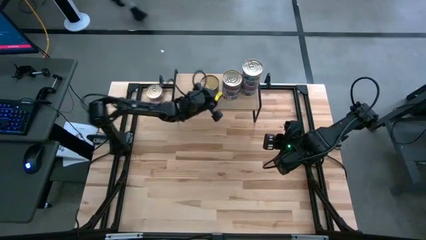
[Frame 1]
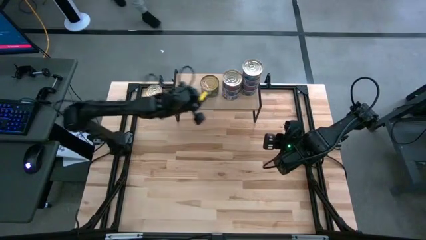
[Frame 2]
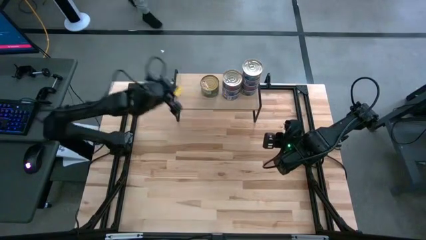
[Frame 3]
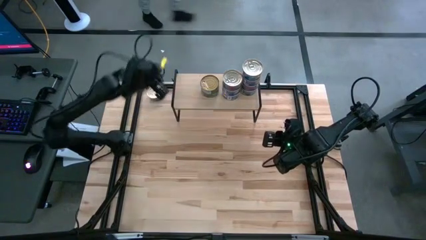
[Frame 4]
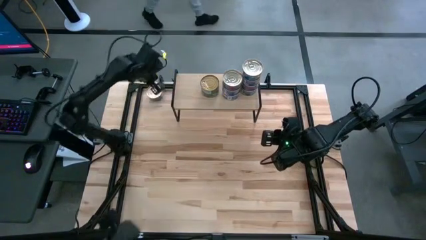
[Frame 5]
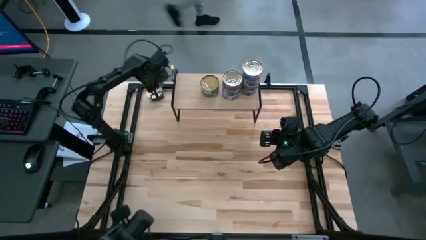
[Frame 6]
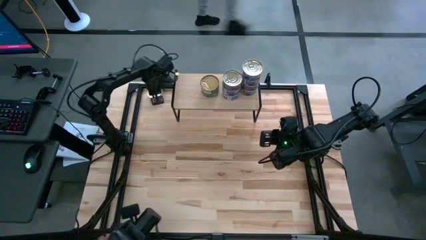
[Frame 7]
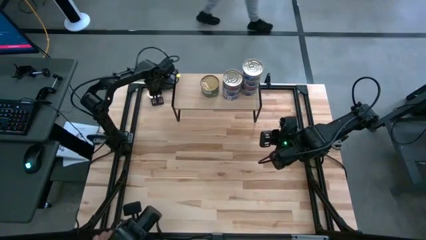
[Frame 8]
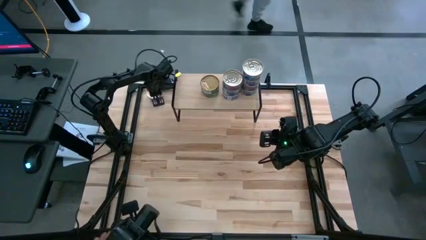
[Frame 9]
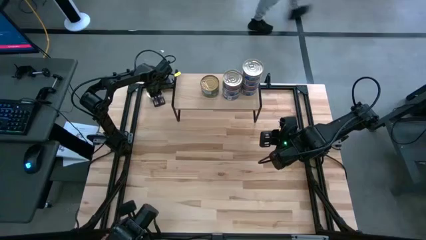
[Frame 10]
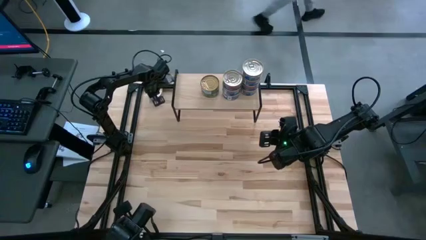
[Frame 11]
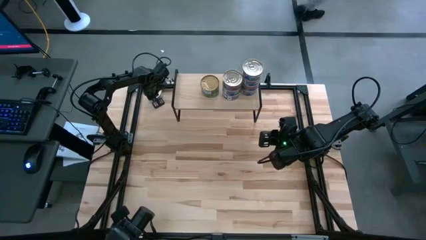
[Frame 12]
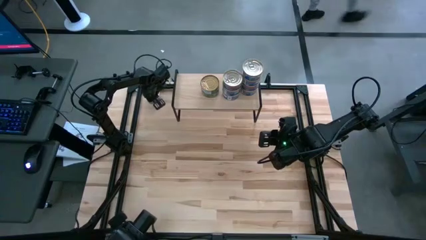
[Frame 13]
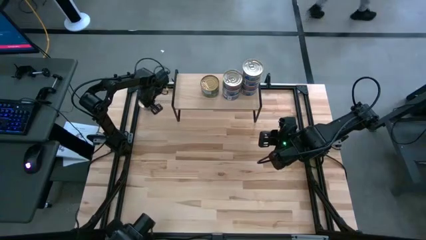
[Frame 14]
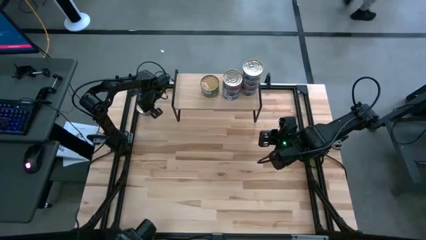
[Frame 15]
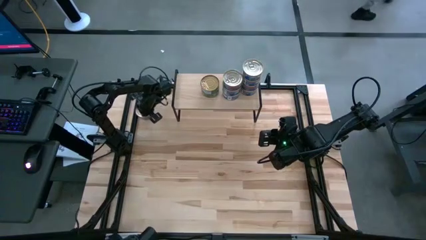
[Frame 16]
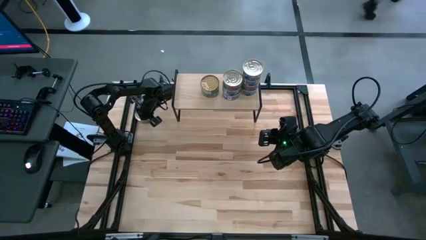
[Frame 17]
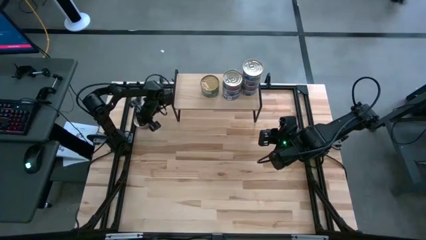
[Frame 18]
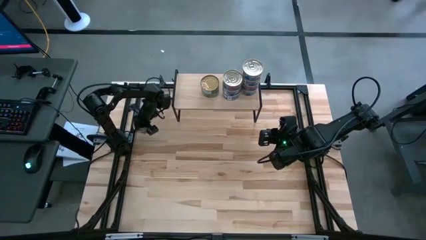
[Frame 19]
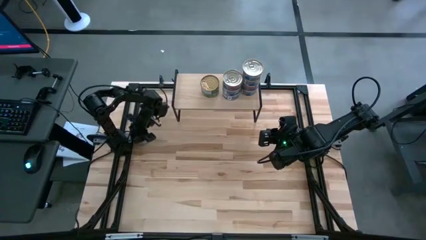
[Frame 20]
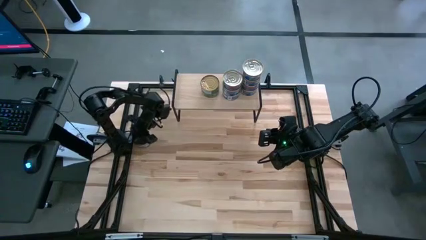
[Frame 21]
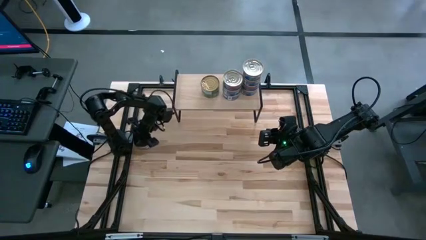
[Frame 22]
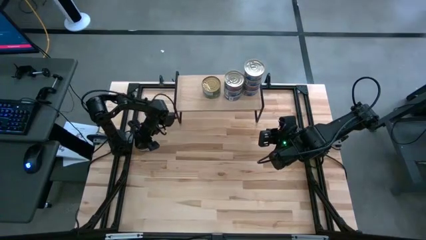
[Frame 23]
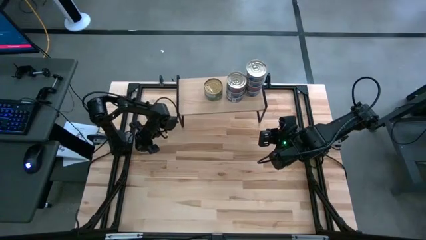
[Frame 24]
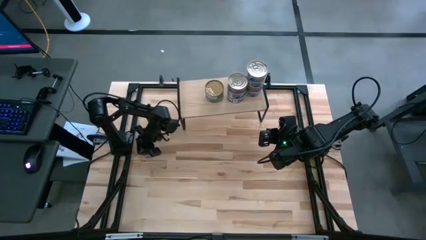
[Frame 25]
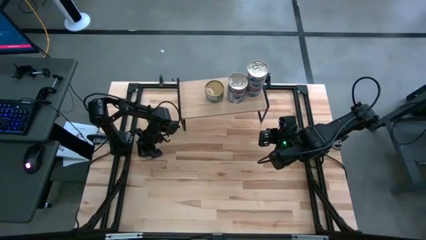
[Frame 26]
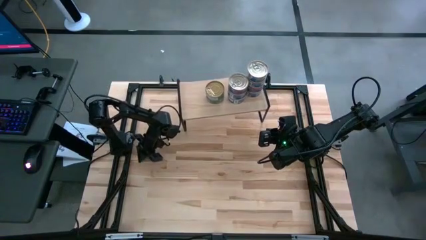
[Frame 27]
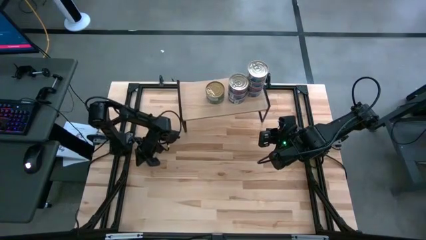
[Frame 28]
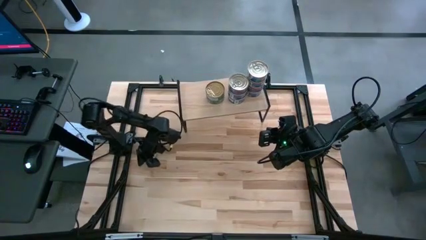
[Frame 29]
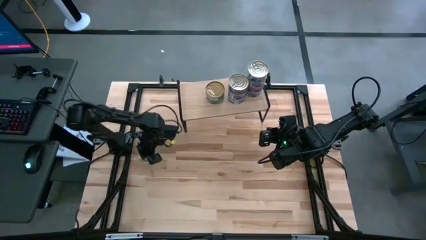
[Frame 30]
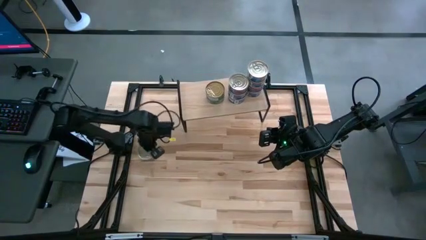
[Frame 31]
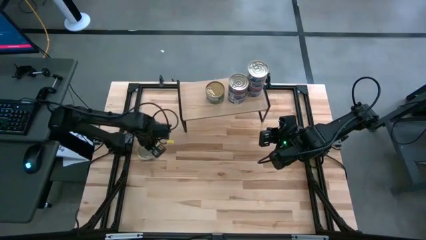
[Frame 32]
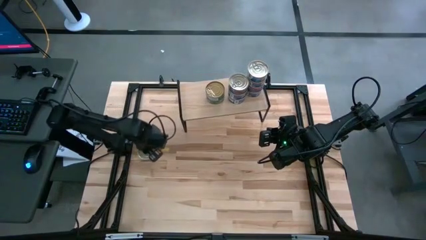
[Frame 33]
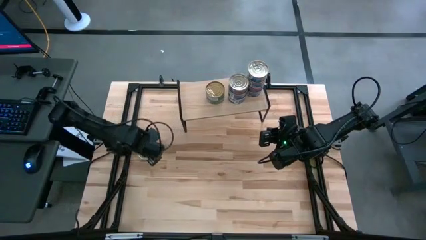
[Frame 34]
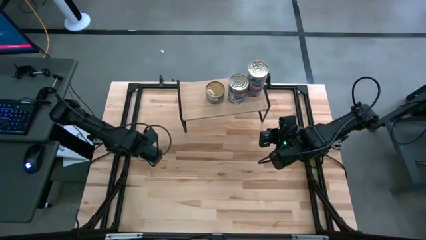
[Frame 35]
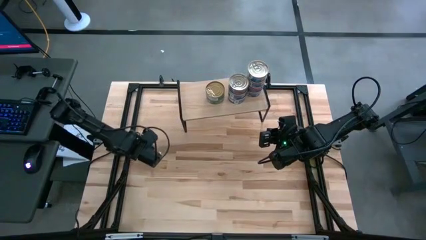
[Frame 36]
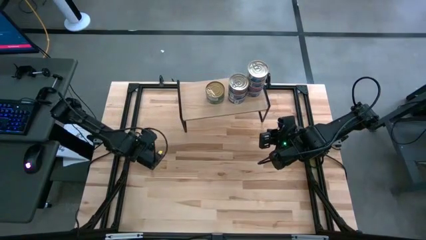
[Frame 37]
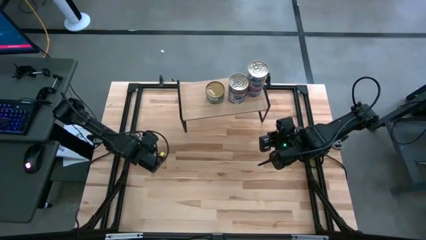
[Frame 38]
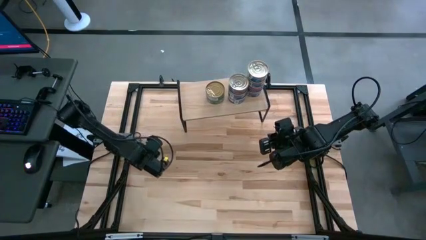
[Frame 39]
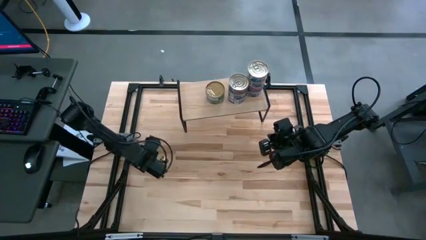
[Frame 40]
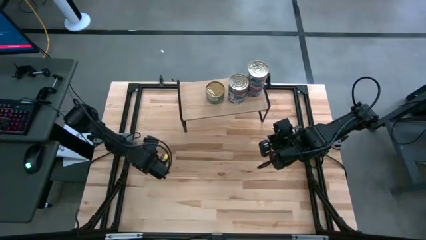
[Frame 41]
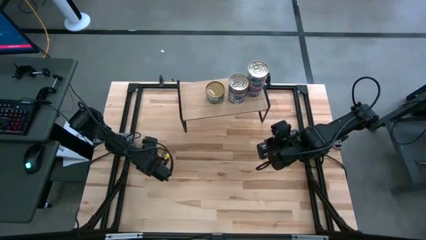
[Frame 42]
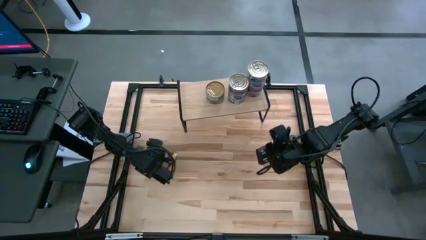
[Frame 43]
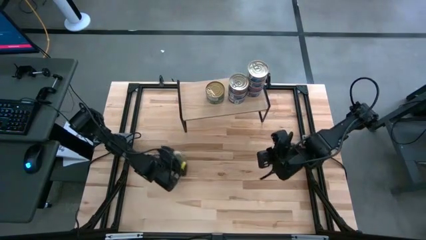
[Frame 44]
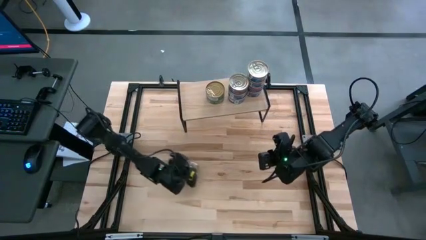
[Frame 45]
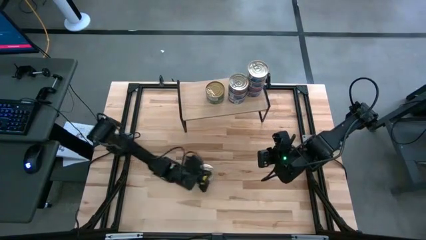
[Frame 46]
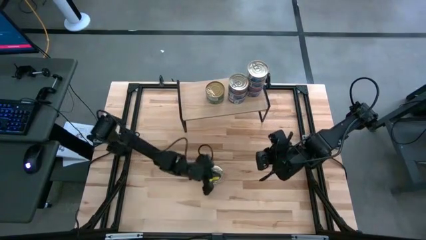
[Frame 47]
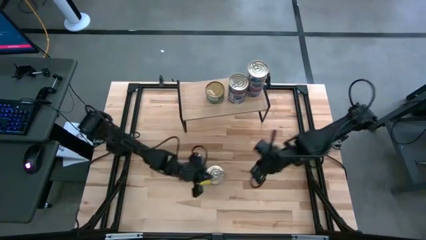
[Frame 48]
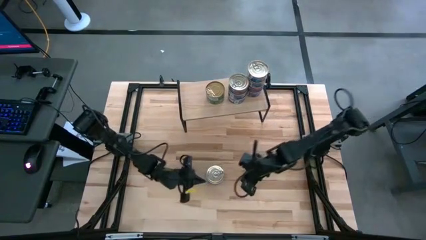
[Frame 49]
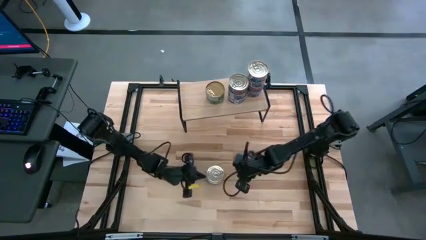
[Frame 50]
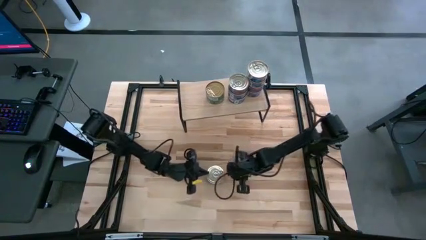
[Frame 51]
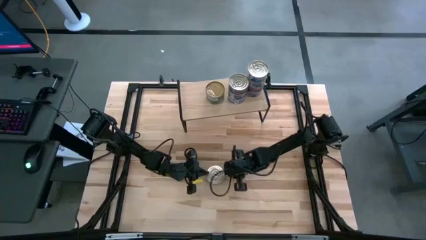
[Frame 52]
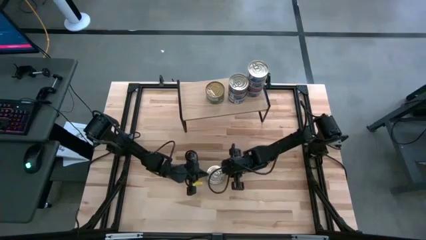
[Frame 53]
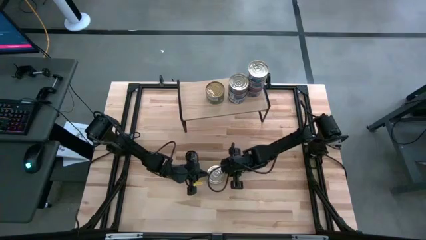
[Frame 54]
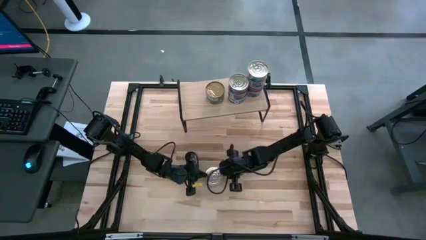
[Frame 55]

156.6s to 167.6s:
Task: Stack canned seafood by type on shelf
Stack the blue tuna can on top of the other stacked blue tuna cans on the shelf

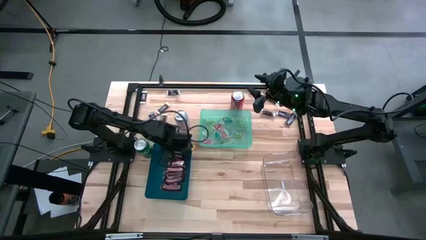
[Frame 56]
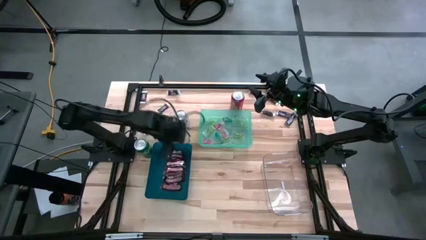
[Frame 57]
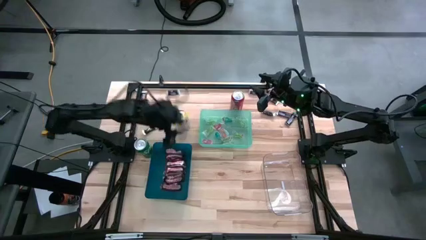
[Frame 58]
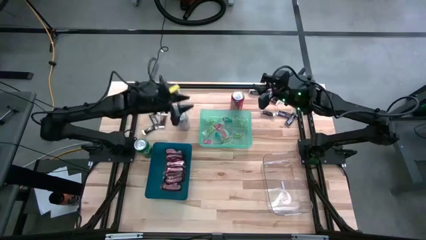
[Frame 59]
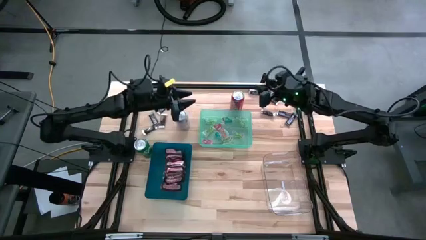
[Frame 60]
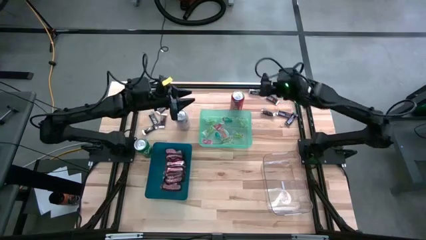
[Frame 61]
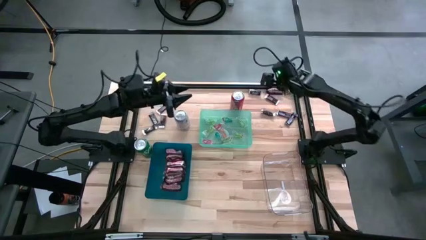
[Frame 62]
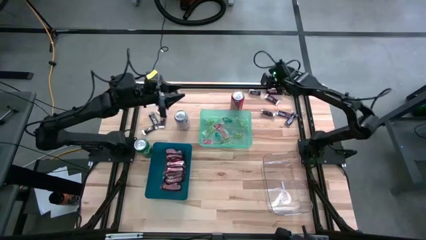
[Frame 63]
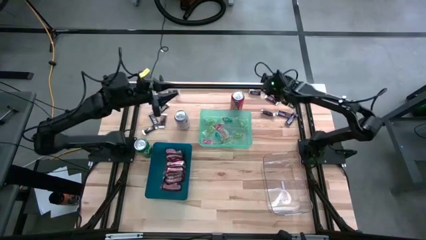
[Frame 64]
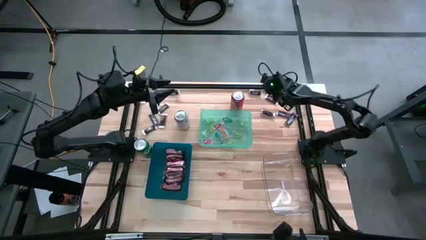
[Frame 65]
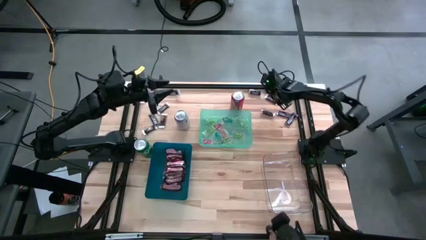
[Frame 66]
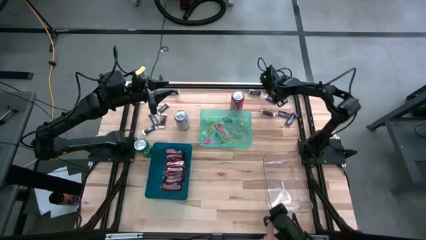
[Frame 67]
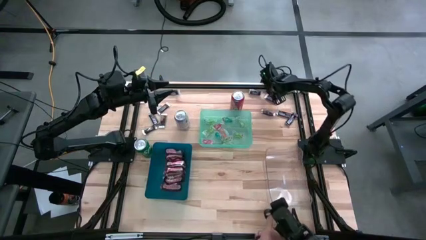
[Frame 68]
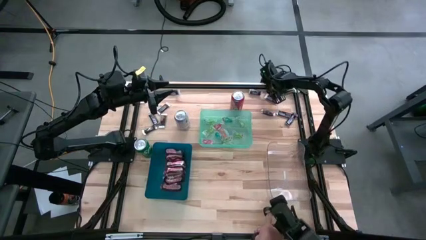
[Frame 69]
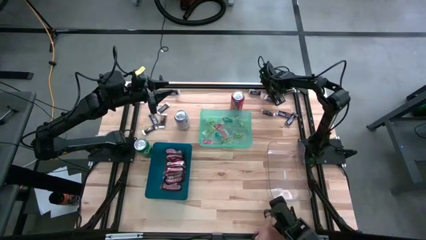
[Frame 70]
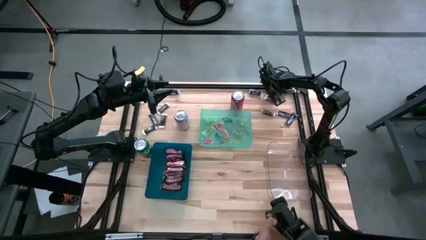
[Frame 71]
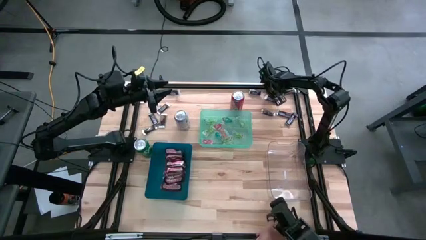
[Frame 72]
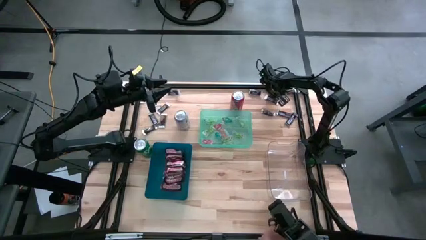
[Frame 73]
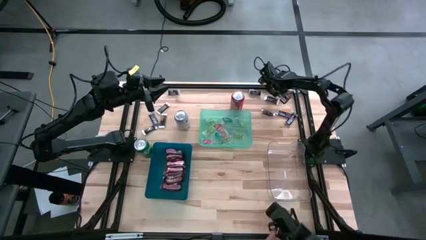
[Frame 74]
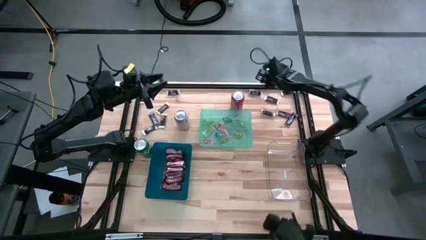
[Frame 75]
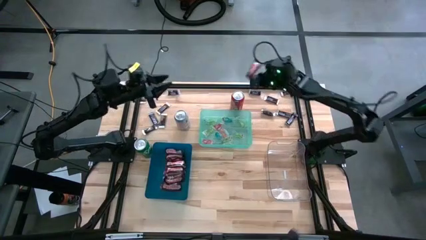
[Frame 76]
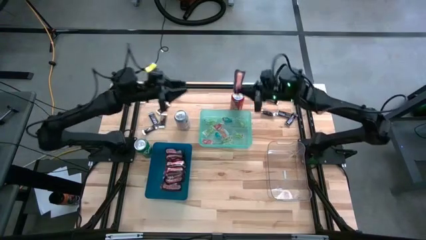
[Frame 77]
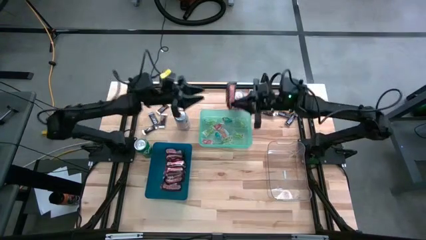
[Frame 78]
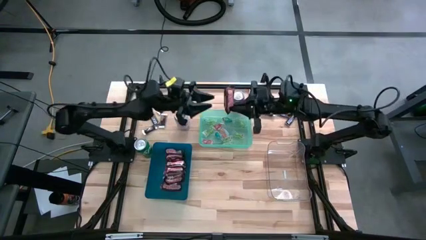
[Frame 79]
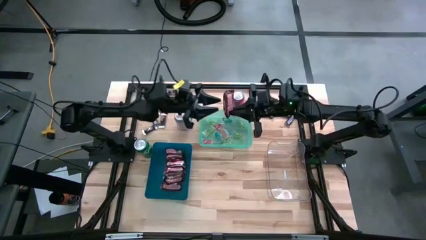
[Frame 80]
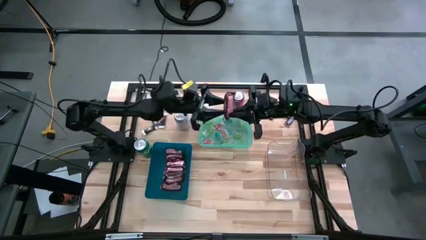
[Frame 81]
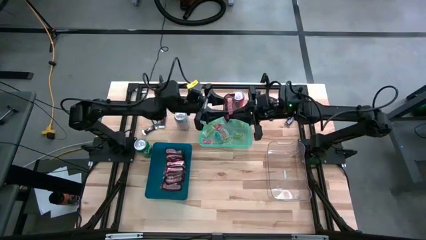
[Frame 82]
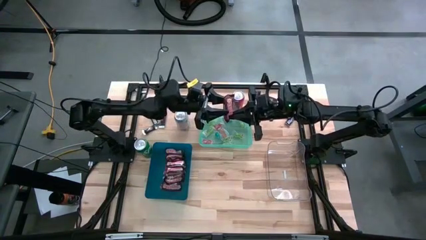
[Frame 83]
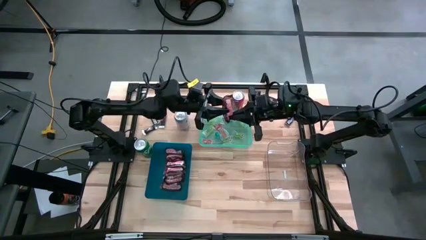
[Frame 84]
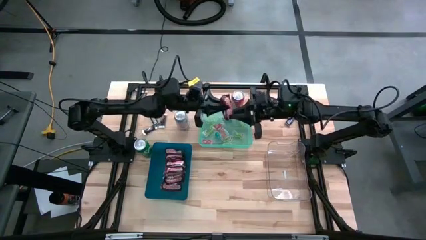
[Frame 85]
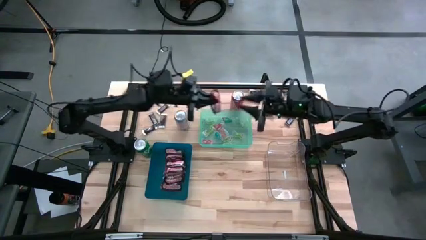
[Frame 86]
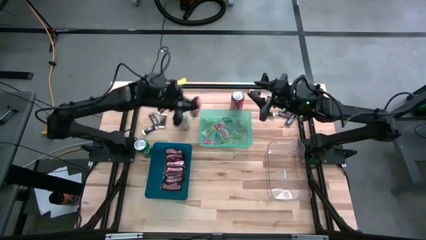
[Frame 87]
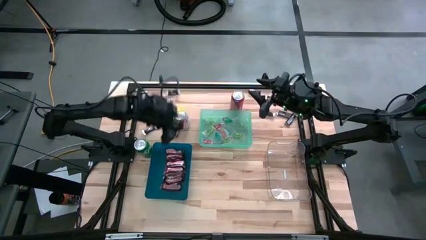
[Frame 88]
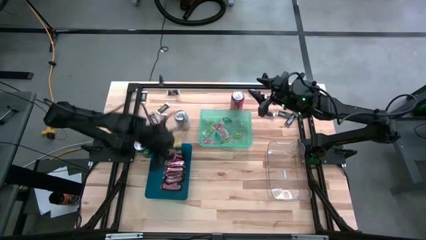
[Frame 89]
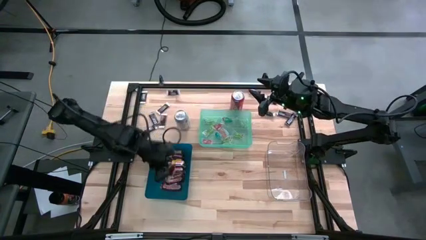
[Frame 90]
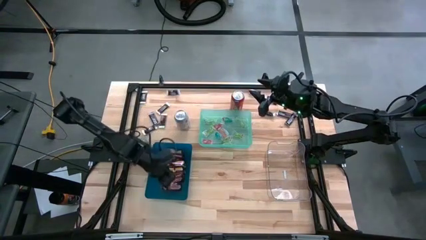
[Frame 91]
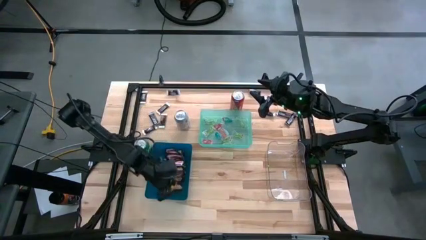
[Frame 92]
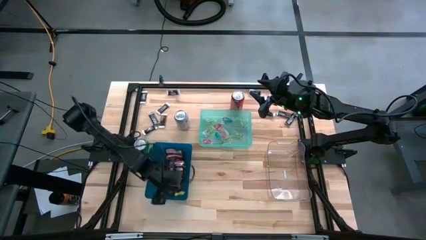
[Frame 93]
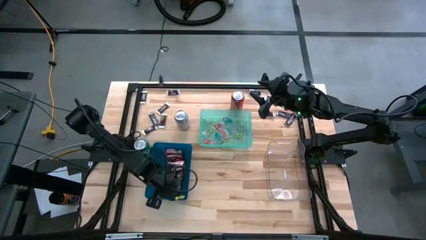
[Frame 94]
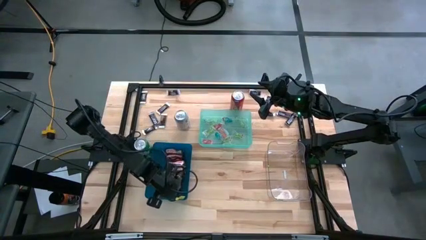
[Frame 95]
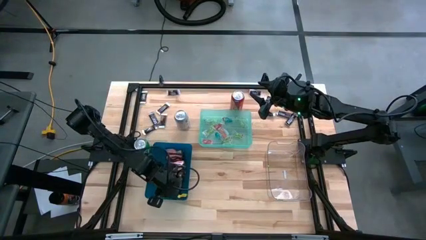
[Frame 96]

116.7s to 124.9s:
Task: Organize candy in baskets
Put the brown red chocolate into the blue bin
